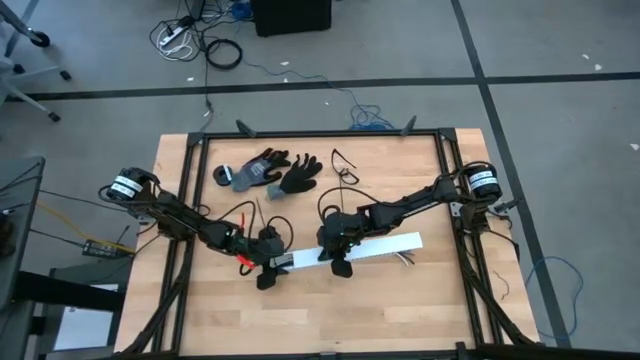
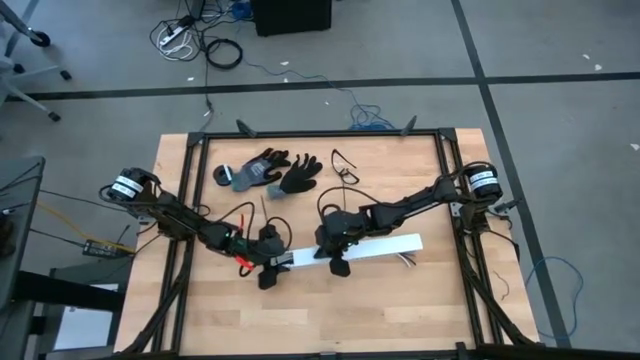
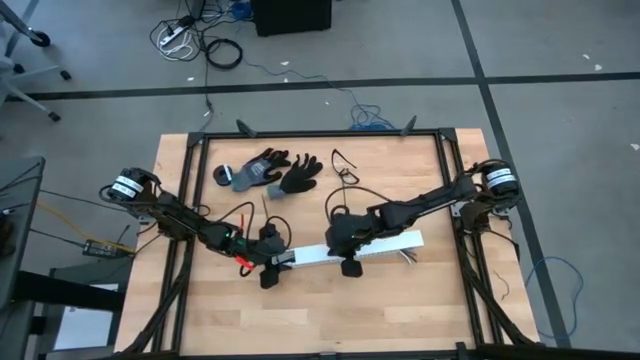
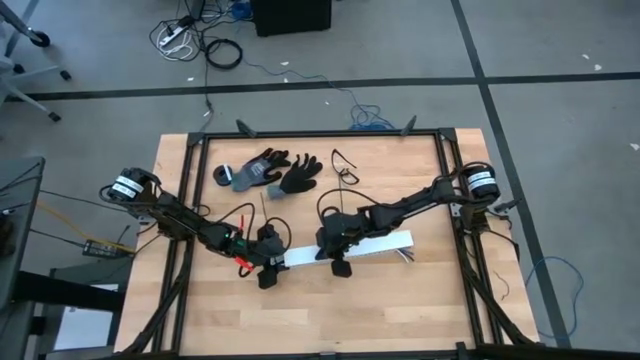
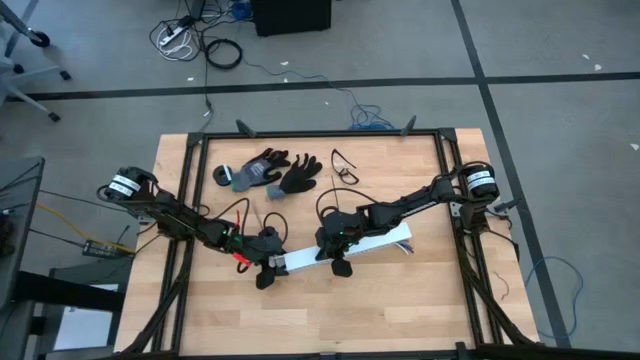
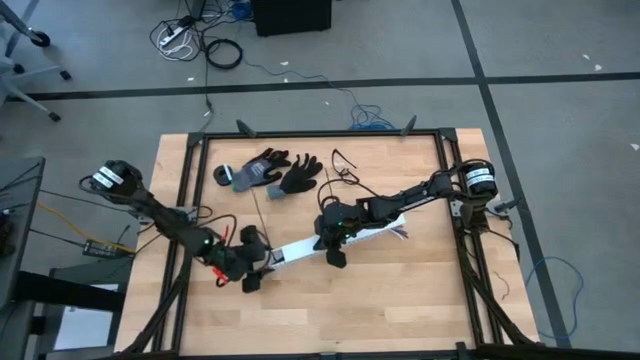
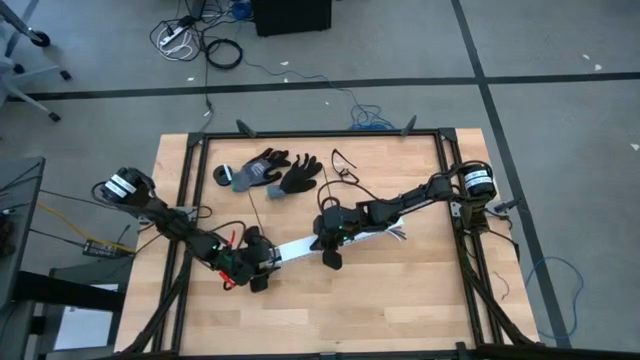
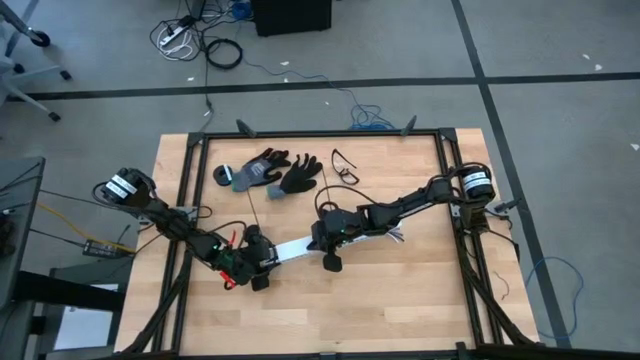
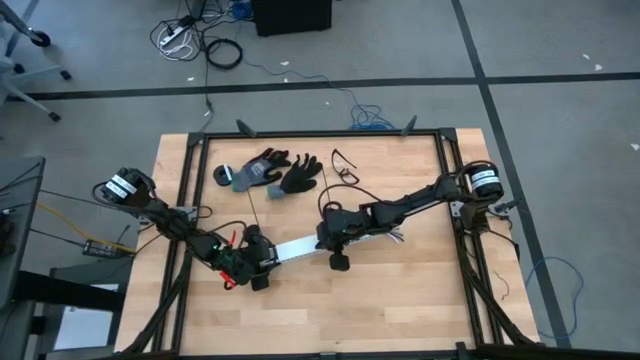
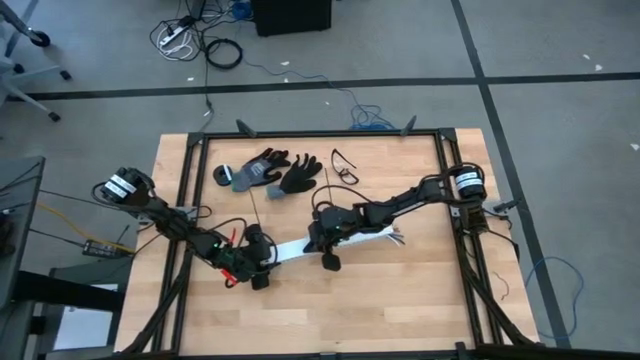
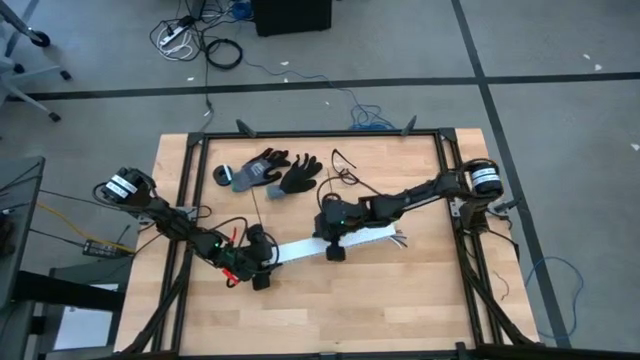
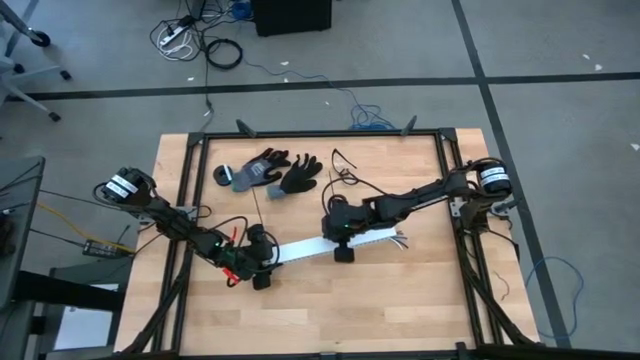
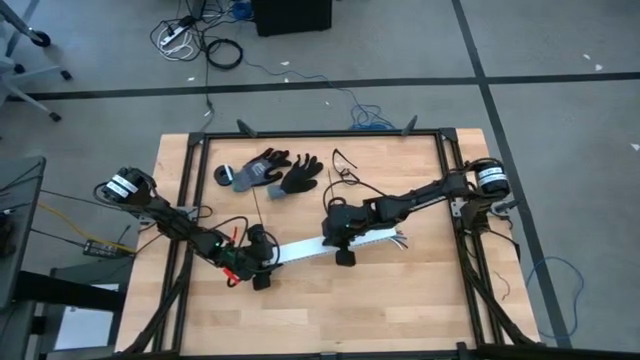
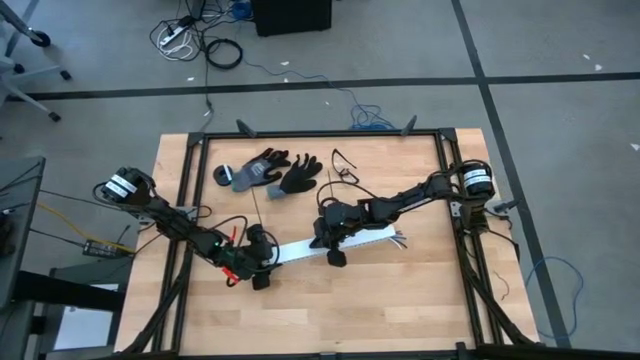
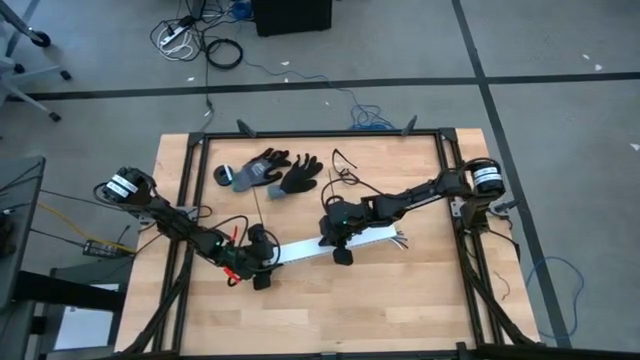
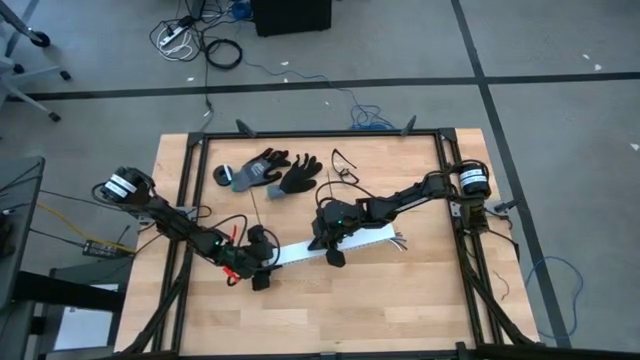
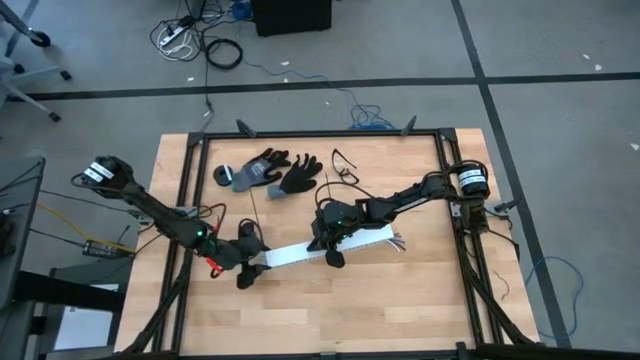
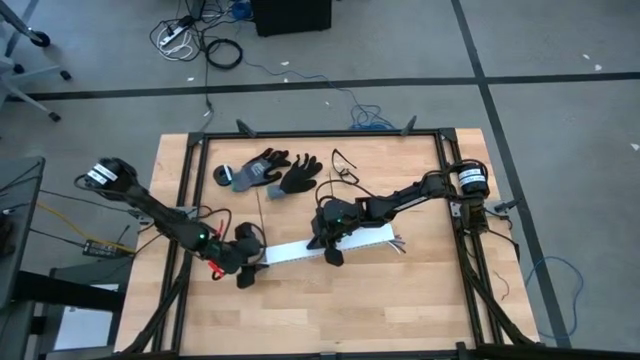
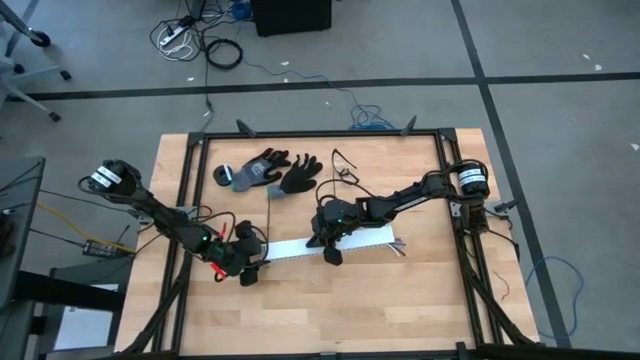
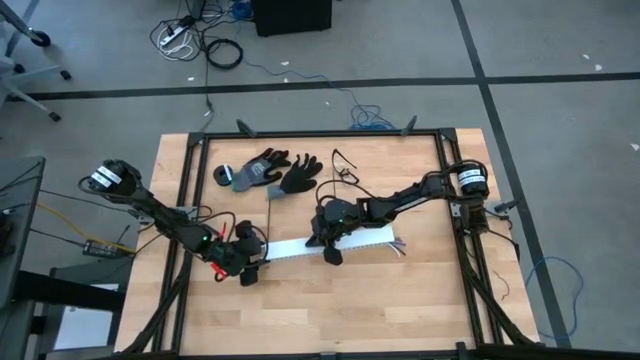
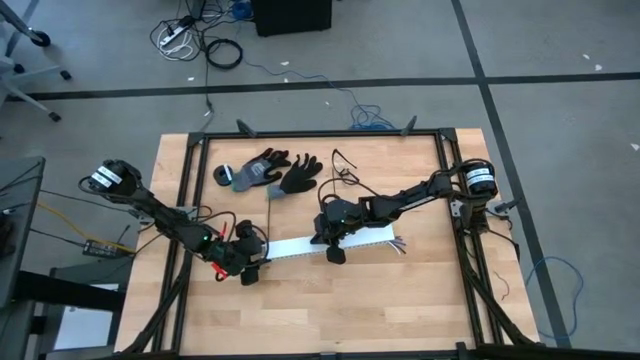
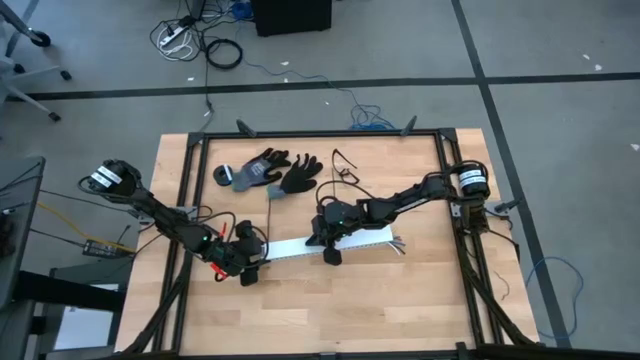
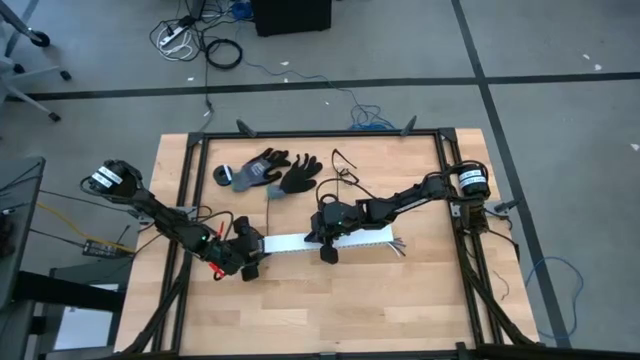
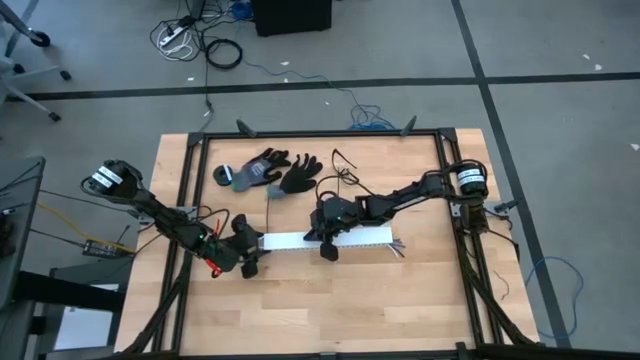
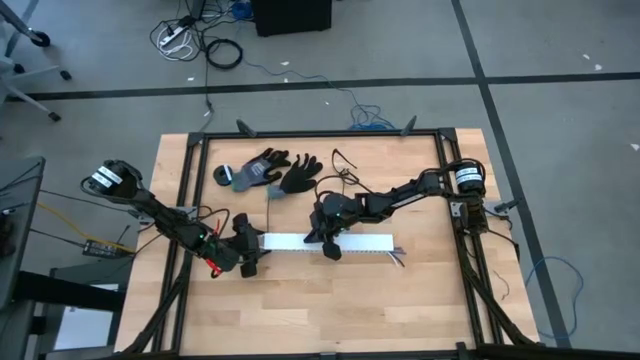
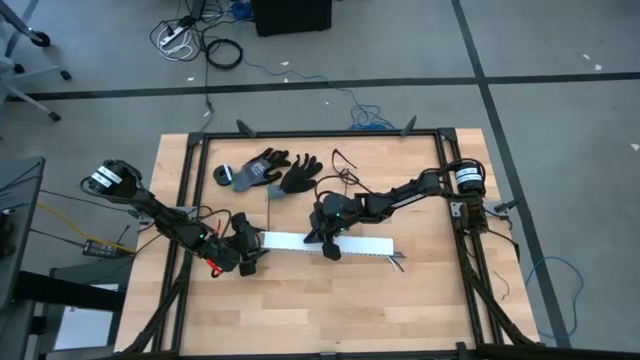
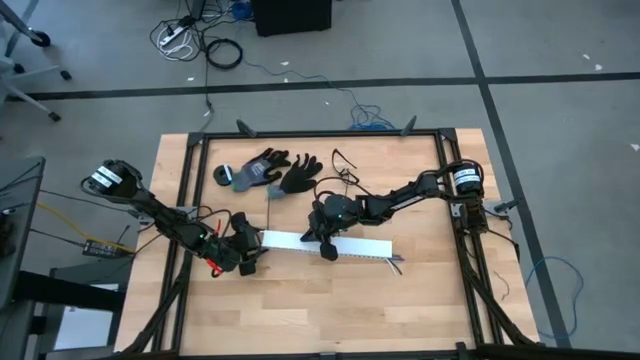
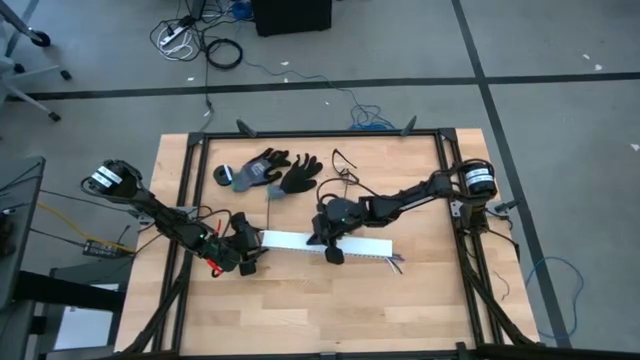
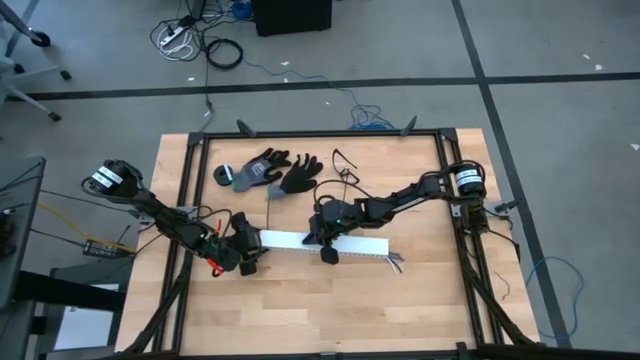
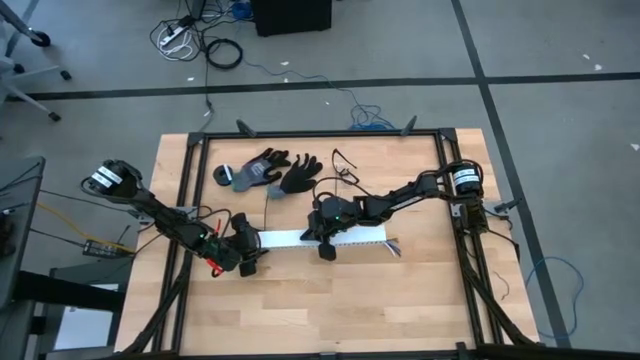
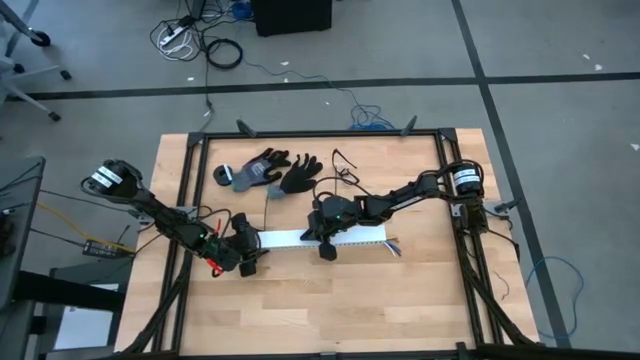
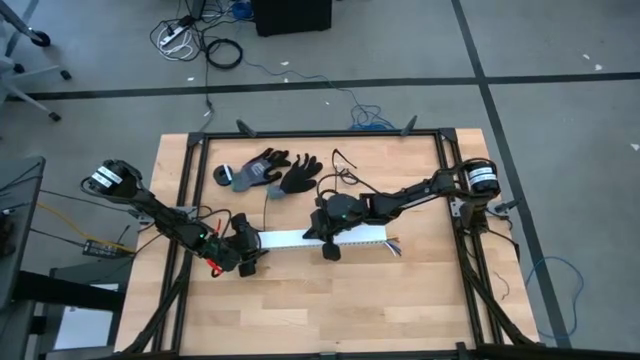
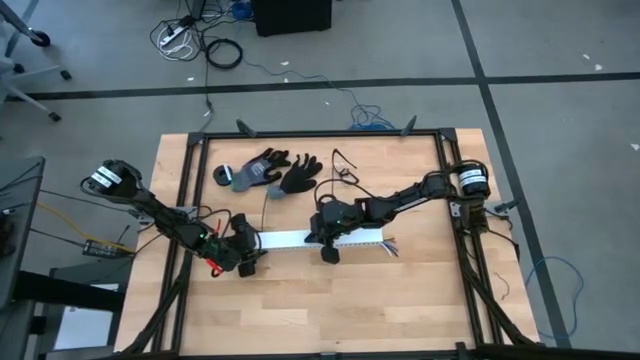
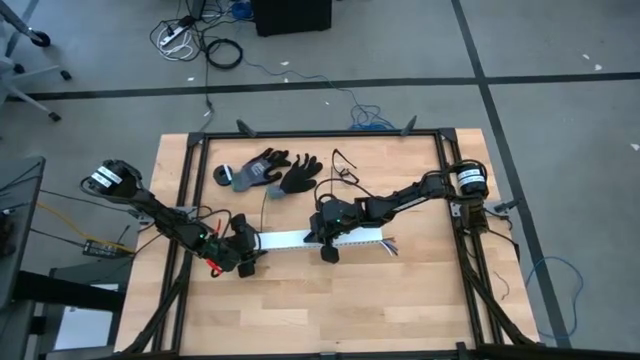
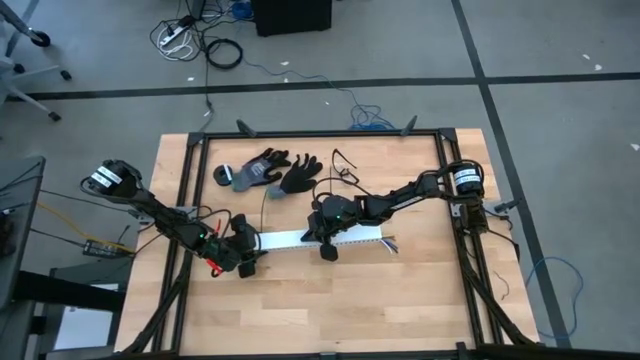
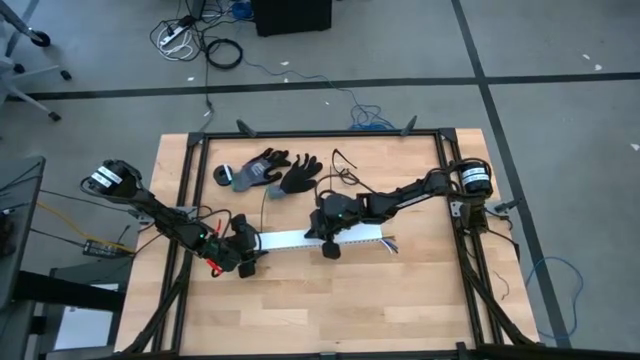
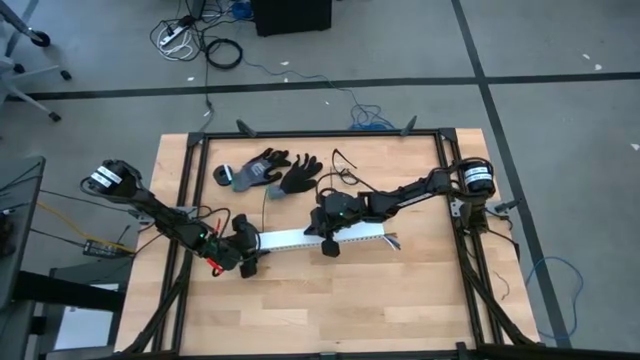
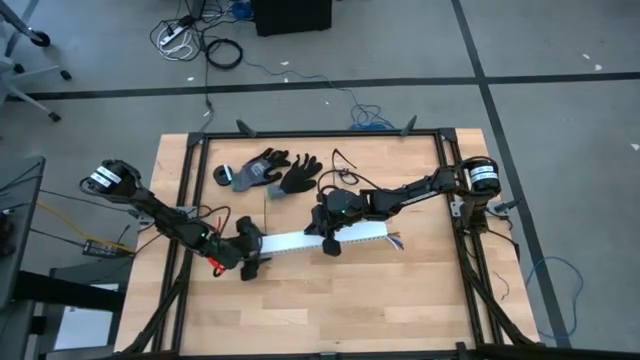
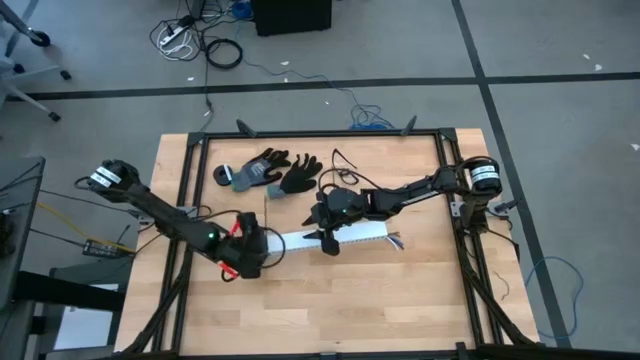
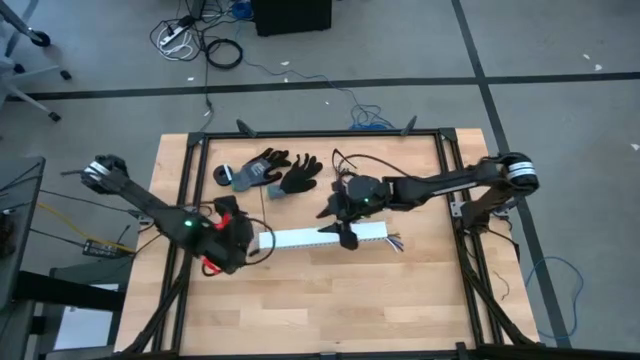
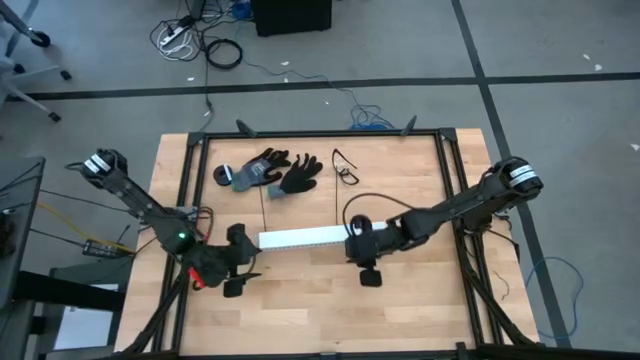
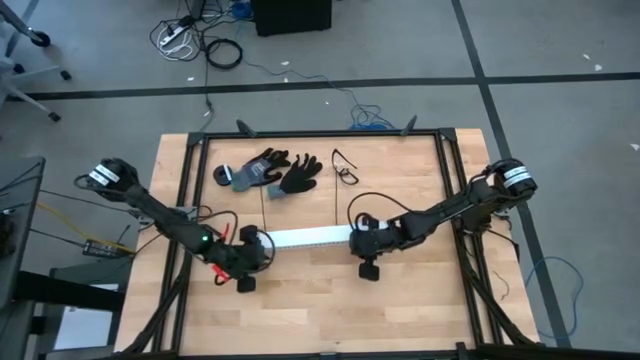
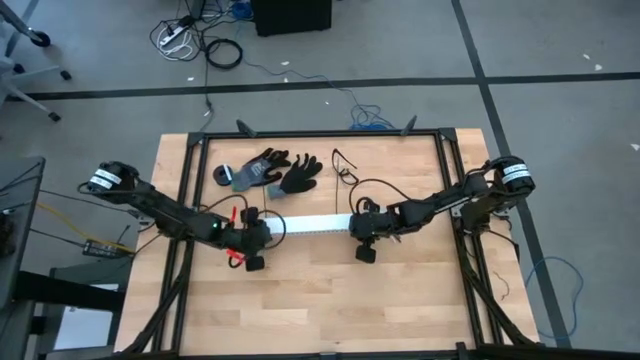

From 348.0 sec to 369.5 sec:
Task: Ziptie cables
Close the white cable duct
